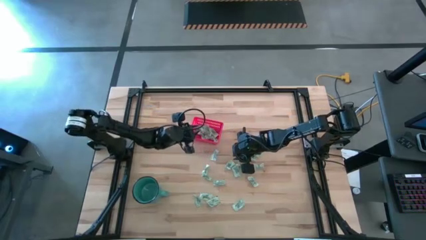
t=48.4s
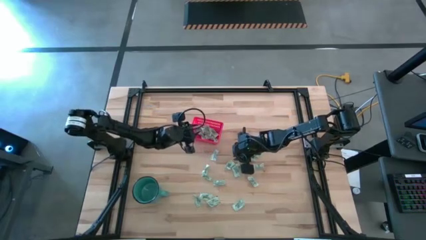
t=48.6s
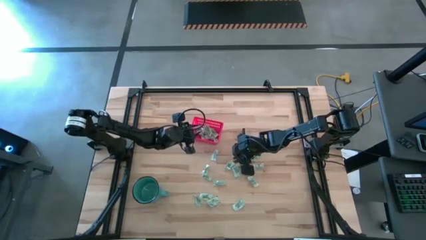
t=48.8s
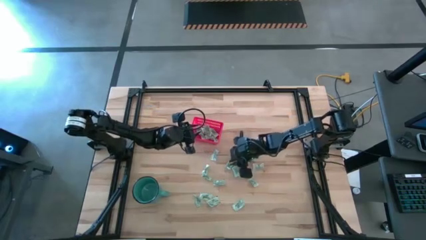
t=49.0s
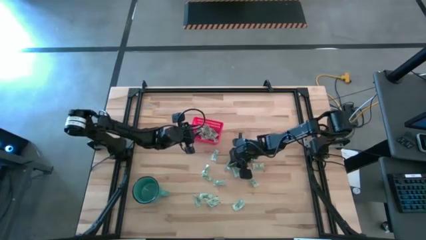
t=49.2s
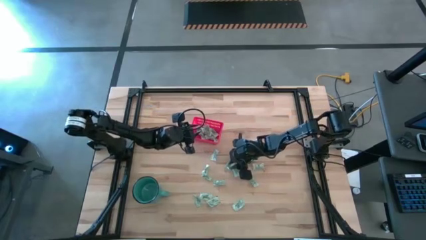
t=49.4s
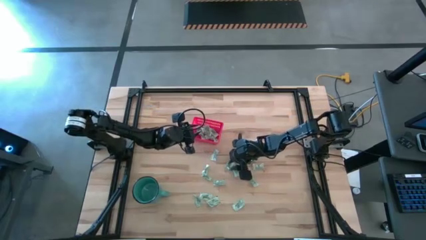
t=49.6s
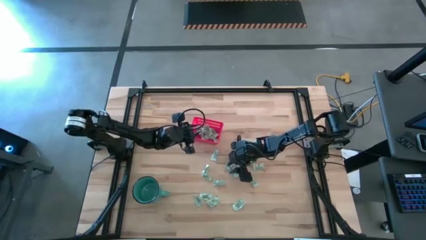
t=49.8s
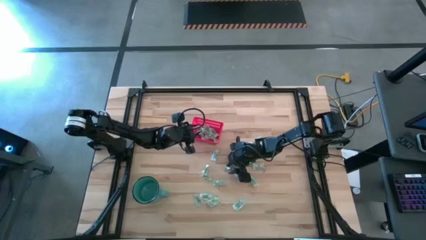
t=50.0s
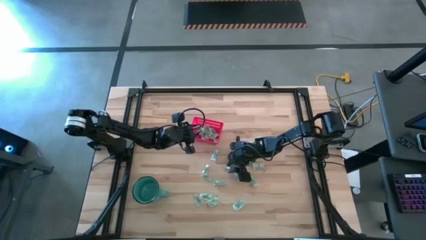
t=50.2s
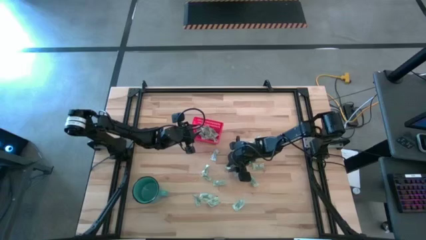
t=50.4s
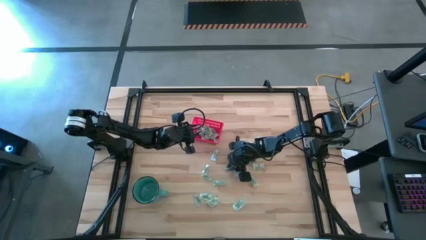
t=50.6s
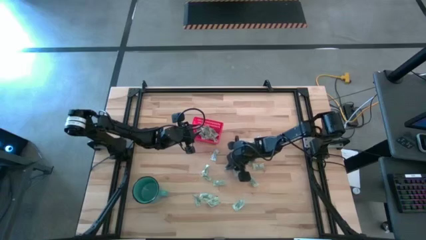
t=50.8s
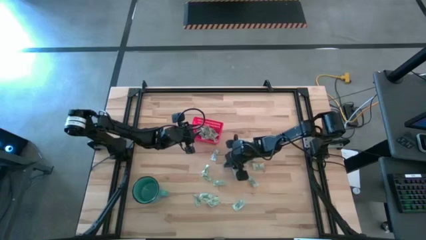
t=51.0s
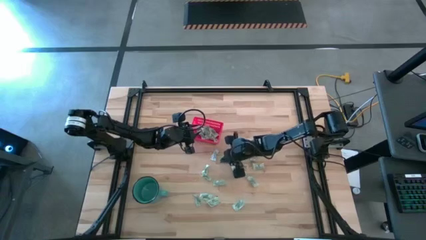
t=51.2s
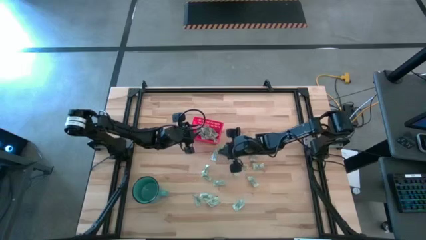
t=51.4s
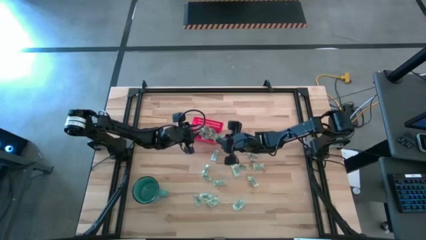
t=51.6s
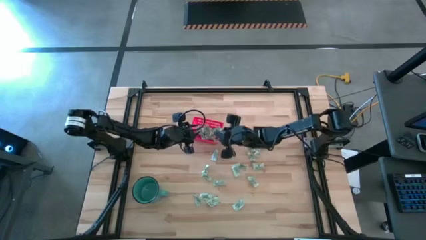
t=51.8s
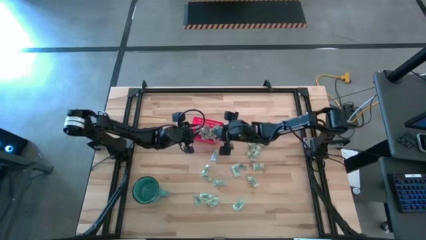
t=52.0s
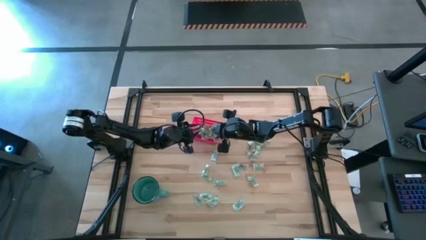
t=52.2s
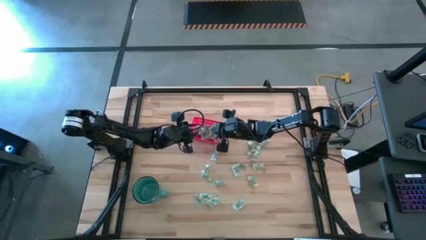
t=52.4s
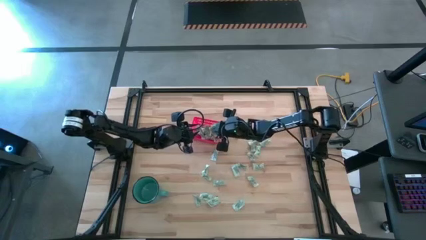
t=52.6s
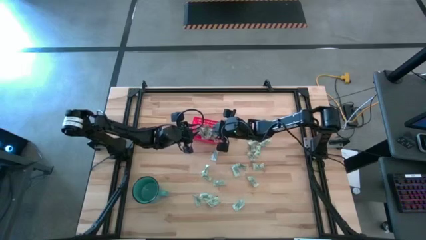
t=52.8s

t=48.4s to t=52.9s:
Task: Pick and place items into bin
Put the stevia packet into the red bin

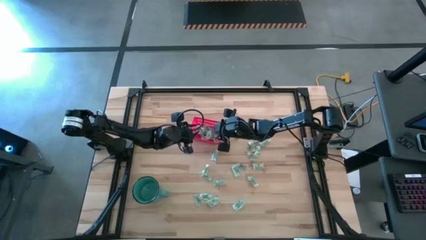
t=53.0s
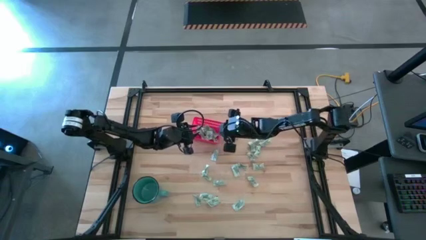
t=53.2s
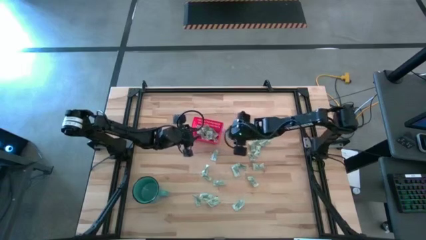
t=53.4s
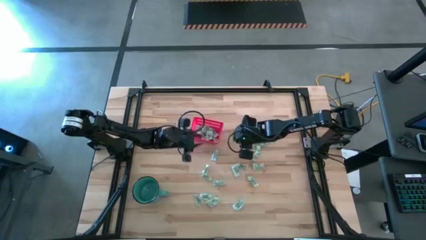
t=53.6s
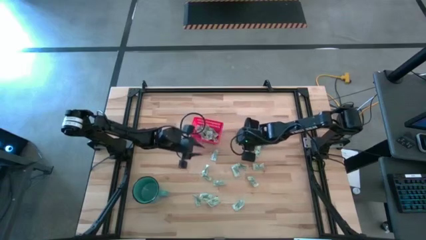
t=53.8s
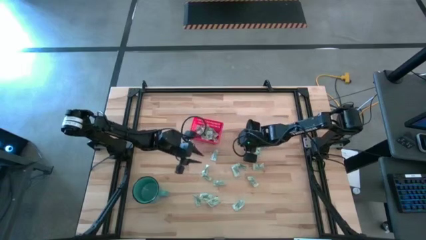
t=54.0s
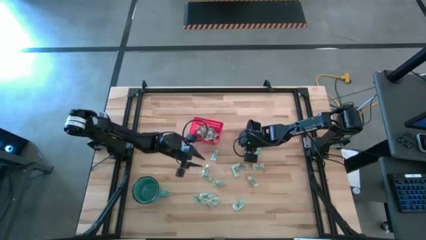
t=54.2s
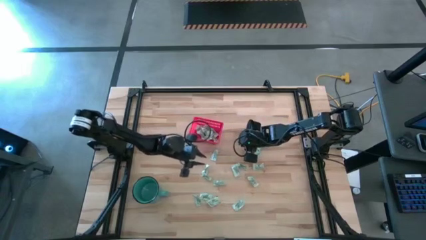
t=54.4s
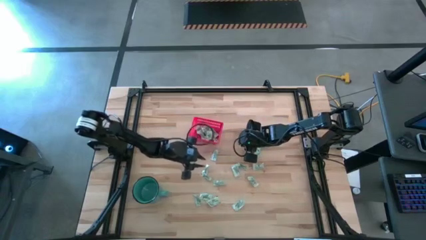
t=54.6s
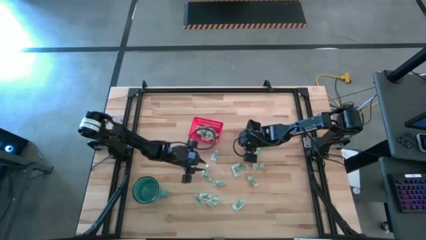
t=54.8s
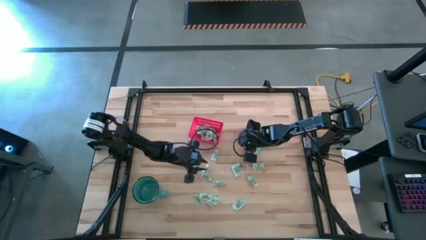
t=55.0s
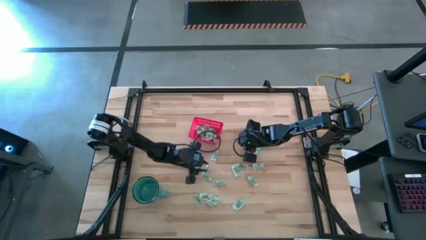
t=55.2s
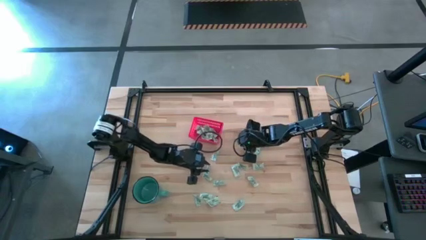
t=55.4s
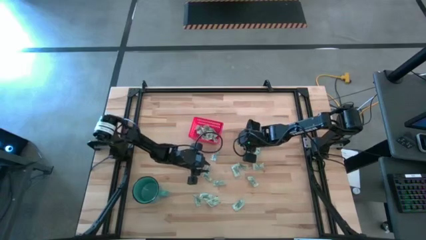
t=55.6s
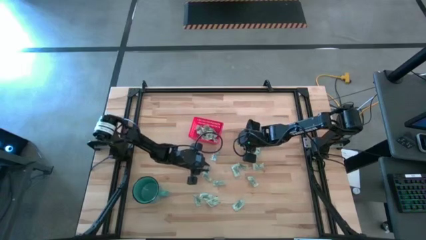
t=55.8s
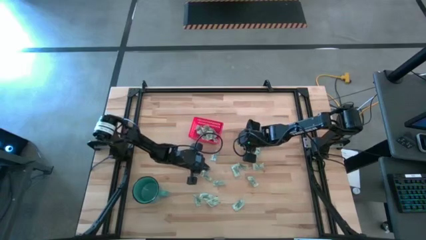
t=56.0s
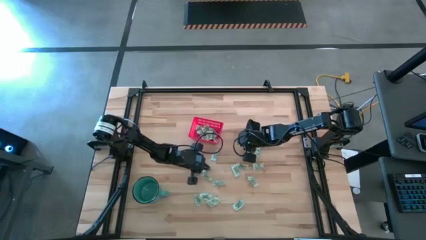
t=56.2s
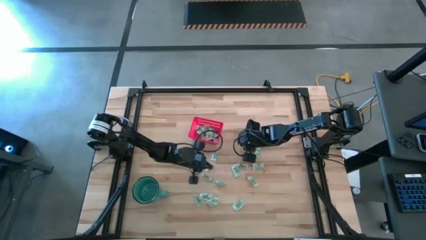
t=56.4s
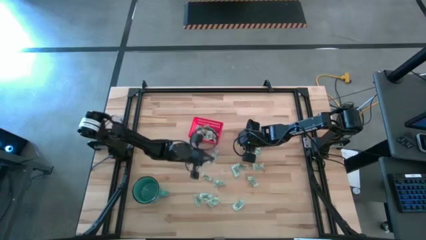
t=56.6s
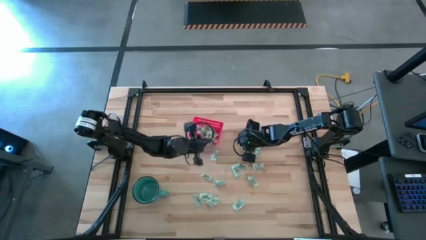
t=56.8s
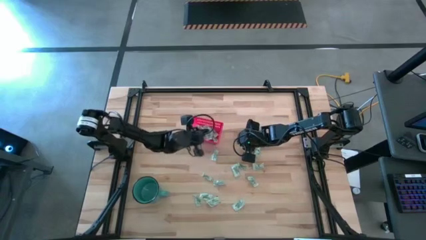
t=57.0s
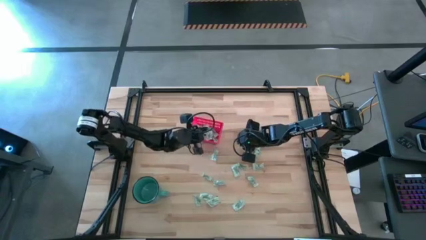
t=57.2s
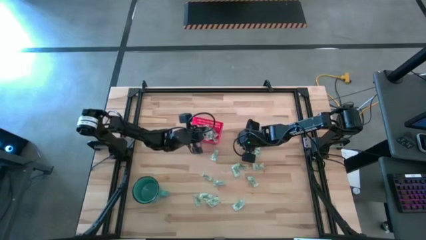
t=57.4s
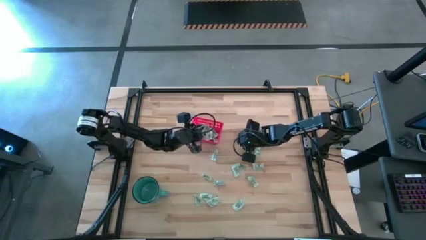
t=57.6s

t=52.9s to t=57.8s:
Put the stevia packet into the red bin

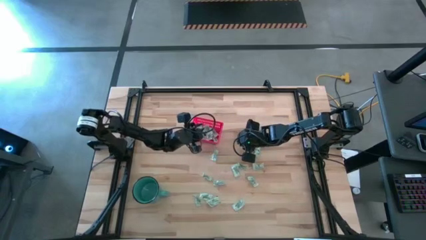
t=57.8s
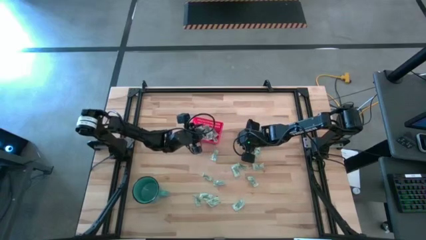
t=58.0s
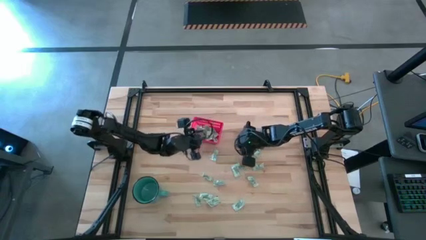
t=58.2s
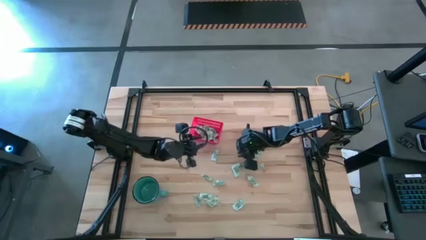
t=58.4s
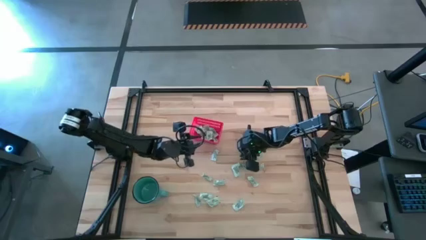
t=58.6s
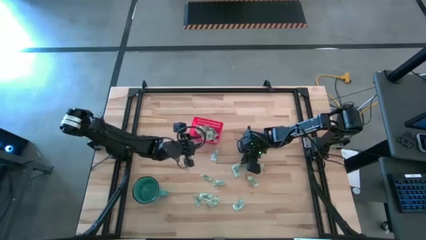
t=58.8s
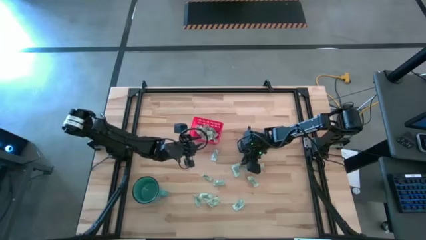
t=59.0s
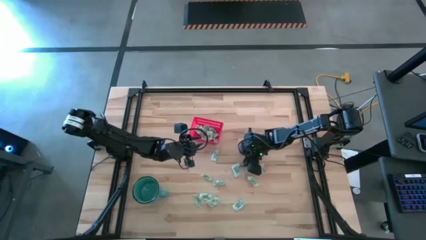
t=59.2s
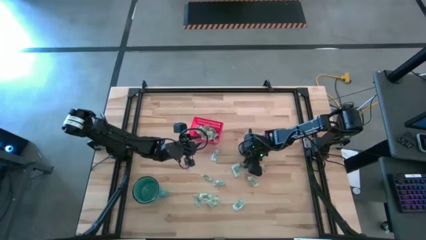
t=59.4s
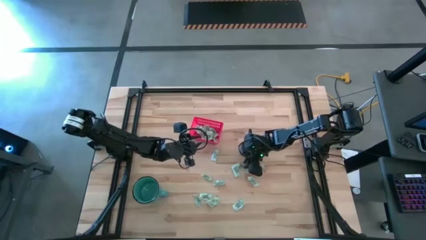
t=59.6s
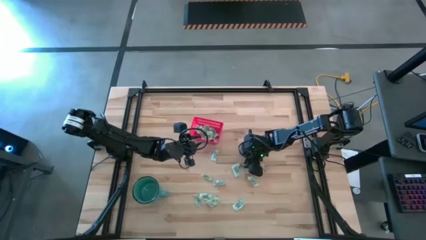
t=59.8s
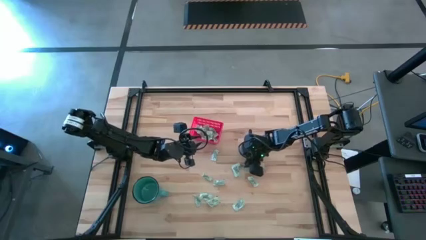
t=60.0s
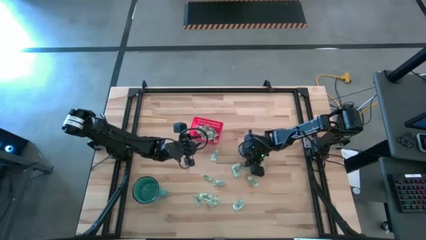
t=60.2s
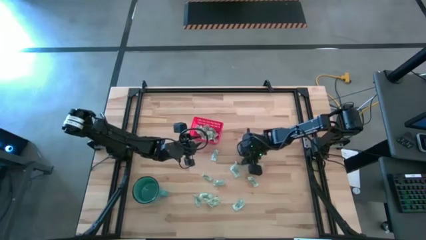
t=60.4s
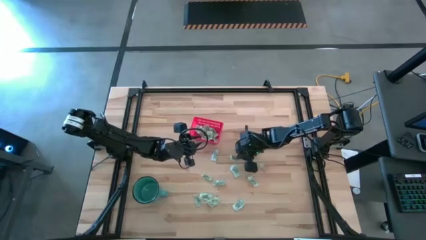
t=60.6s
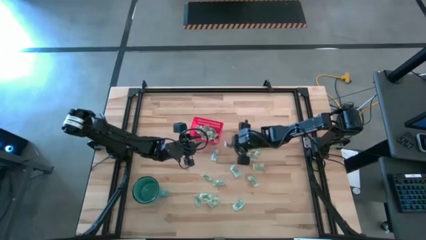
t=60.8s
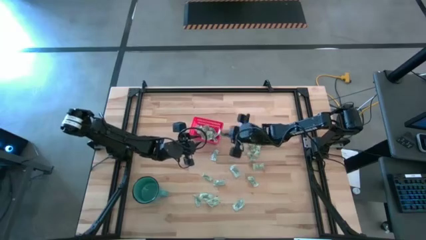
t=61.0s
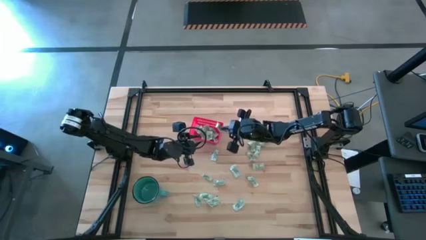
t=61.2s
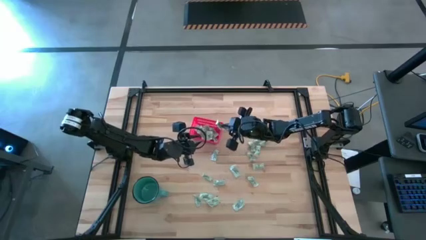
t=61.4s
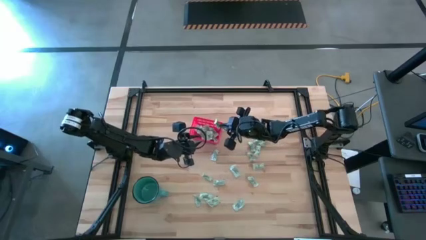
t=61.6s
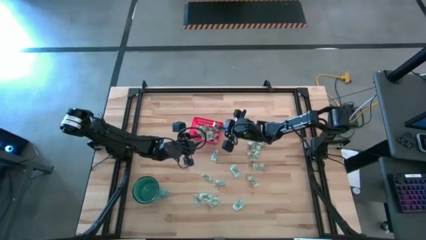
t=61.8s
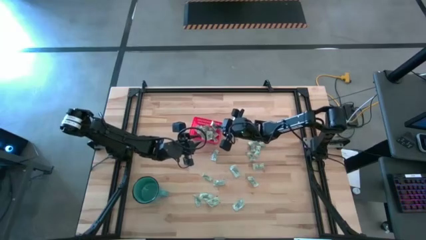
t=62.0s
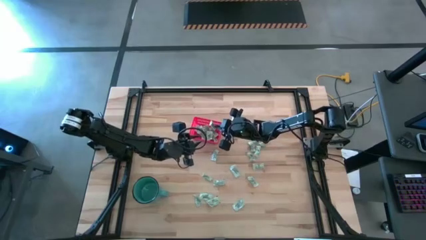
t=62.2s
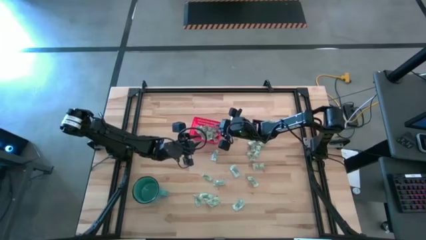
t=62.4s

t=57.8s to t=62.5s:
Put the stevia packet into the red bin

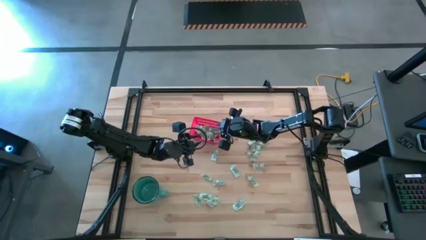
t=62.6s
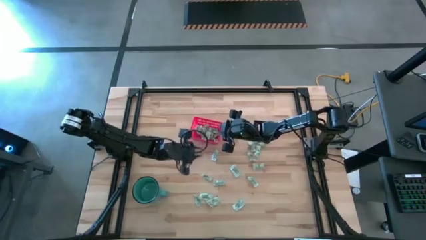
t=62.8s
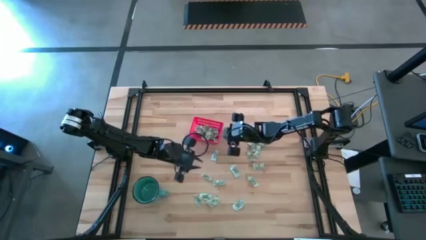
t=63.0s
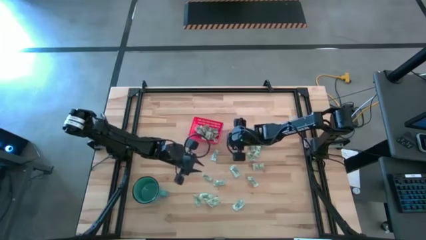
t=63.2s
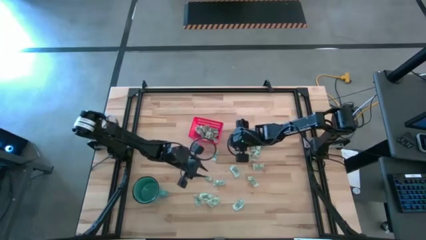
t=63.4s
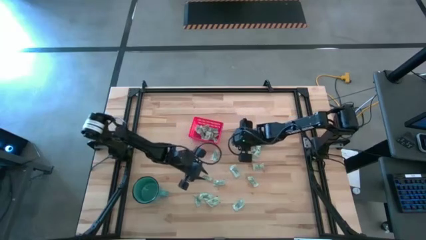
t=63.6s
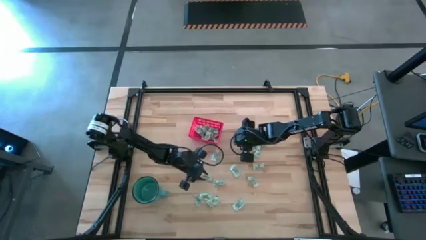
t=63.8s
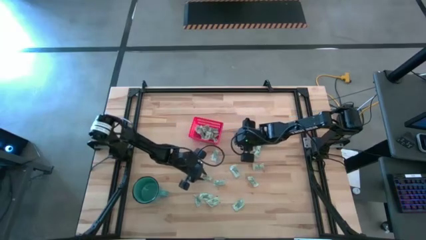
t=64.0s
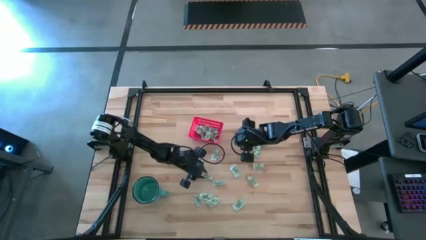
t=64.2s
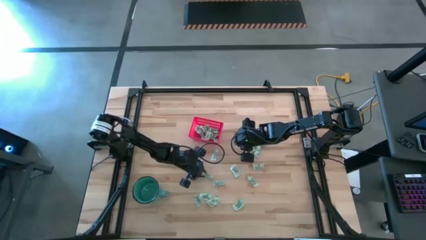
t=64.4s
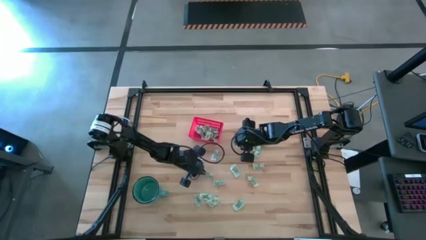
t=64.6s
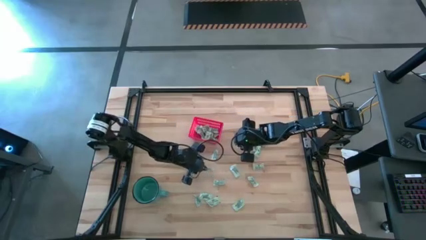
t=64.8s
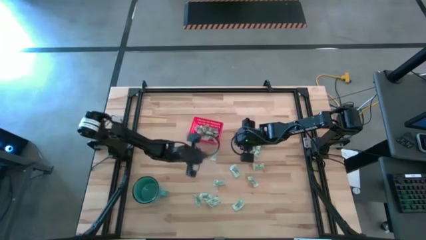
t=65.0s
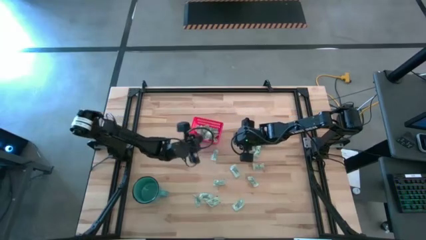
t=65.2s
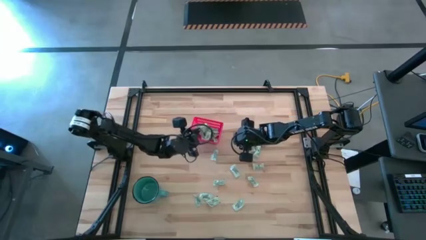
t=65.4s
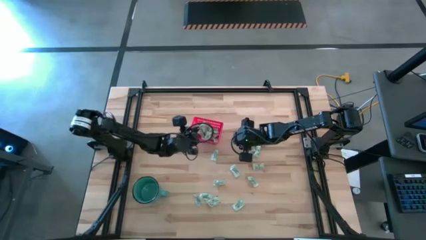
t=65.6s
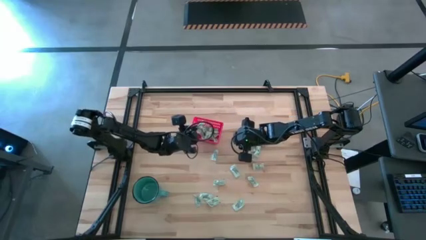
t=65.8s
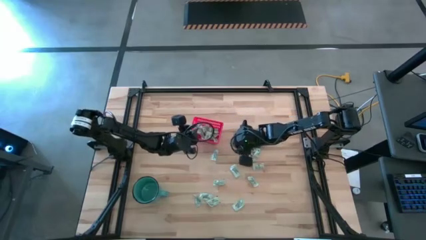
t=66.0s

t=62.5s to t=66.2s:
Put the stevia packet into the red bin
